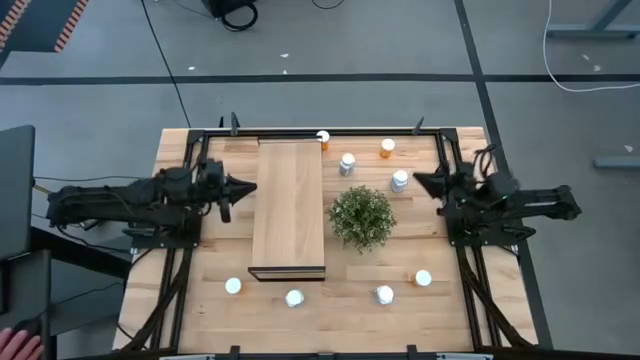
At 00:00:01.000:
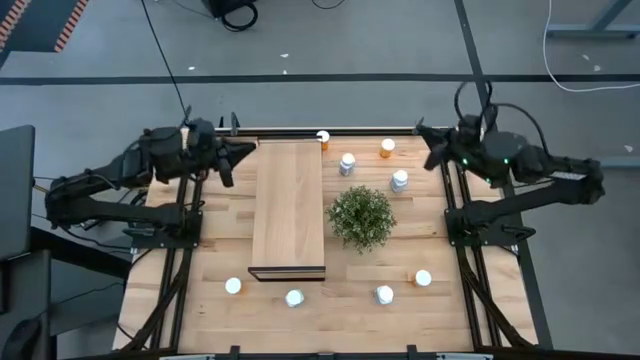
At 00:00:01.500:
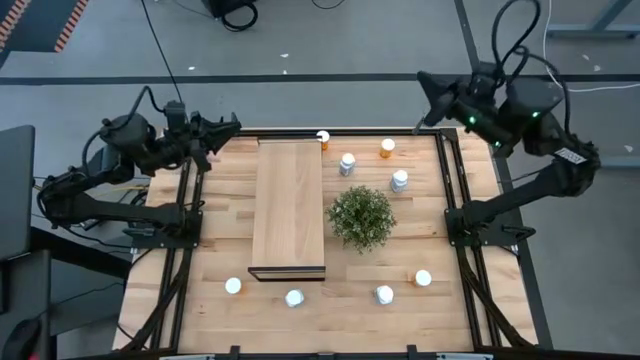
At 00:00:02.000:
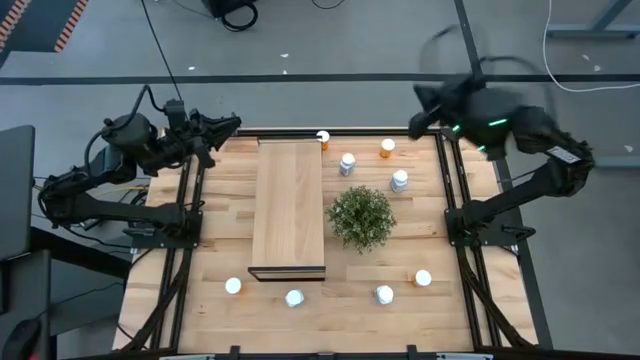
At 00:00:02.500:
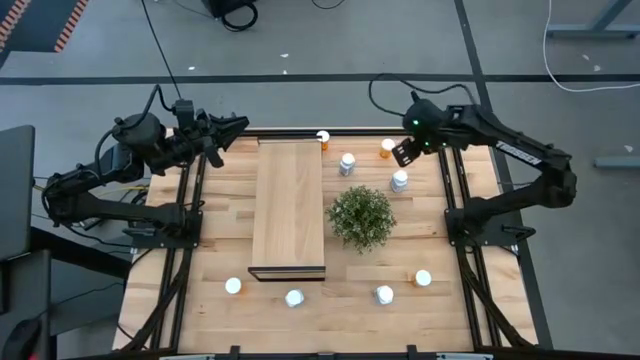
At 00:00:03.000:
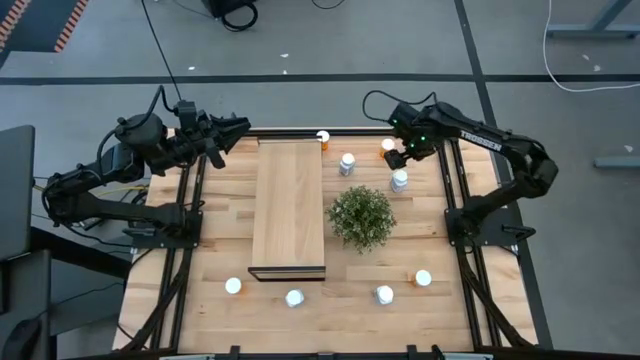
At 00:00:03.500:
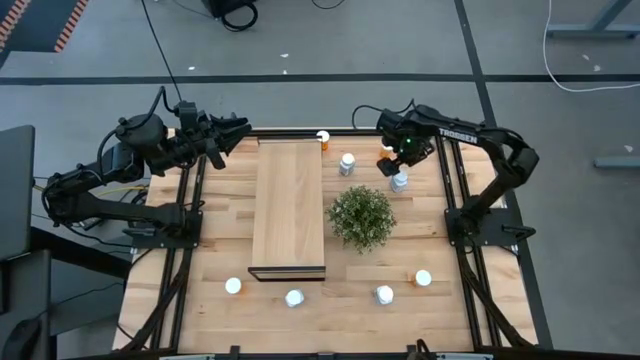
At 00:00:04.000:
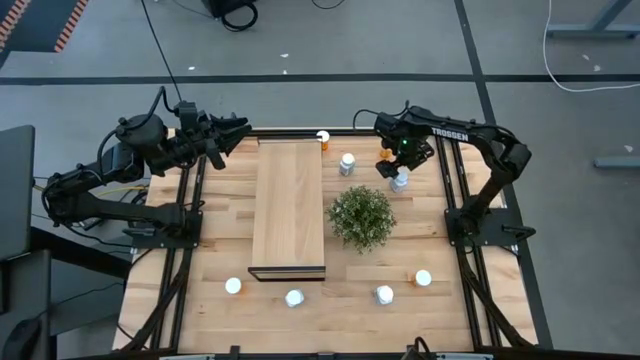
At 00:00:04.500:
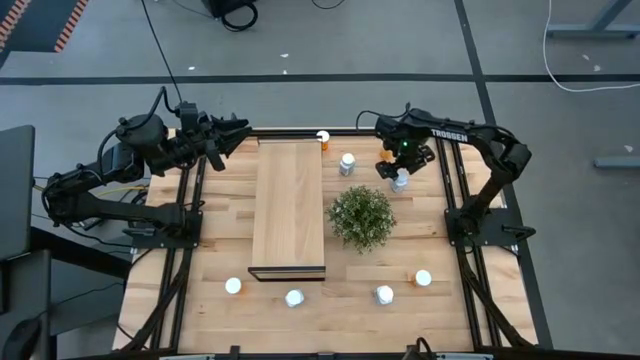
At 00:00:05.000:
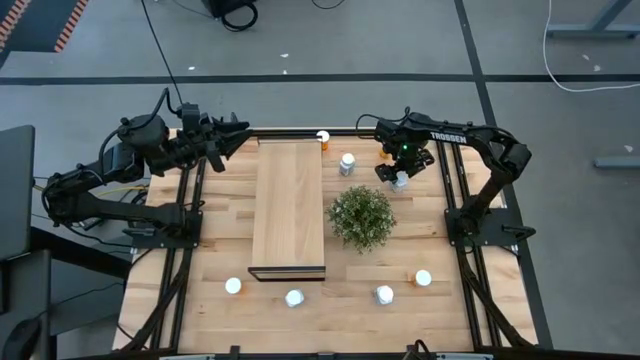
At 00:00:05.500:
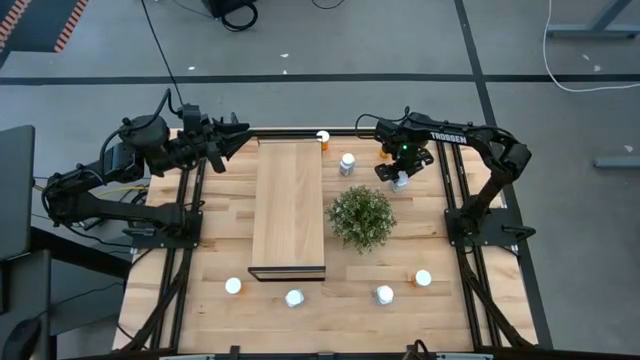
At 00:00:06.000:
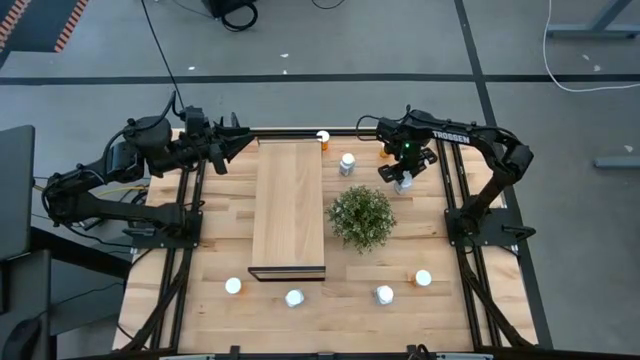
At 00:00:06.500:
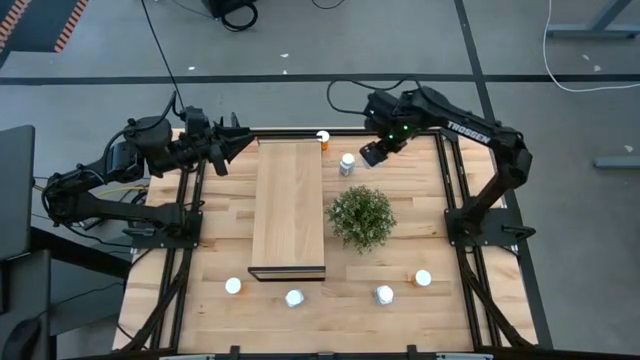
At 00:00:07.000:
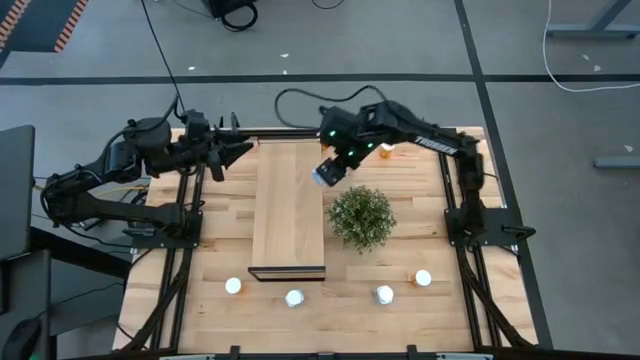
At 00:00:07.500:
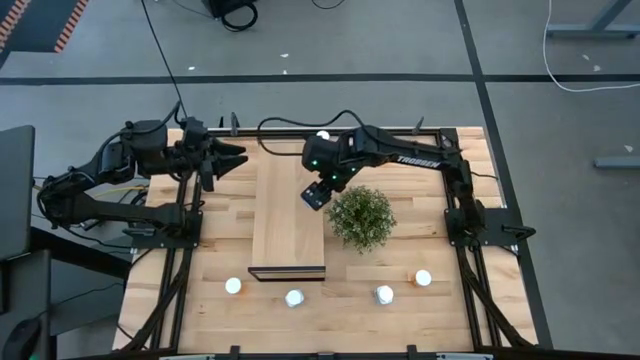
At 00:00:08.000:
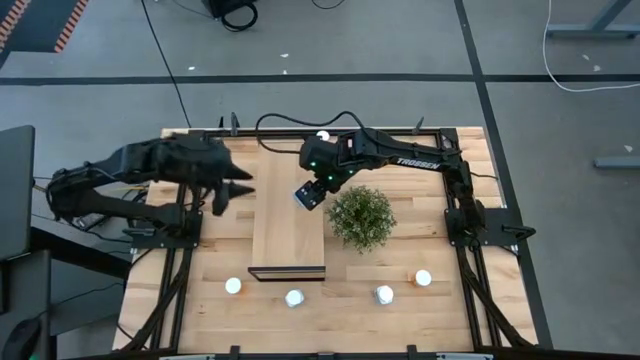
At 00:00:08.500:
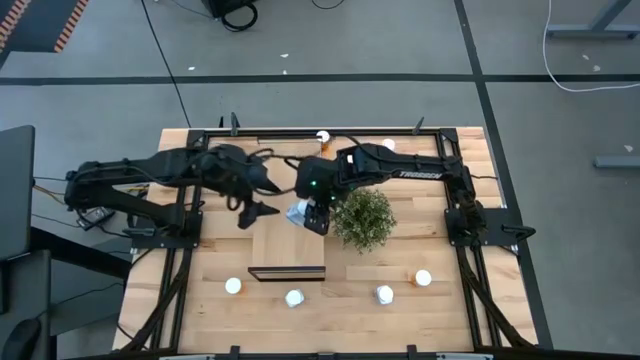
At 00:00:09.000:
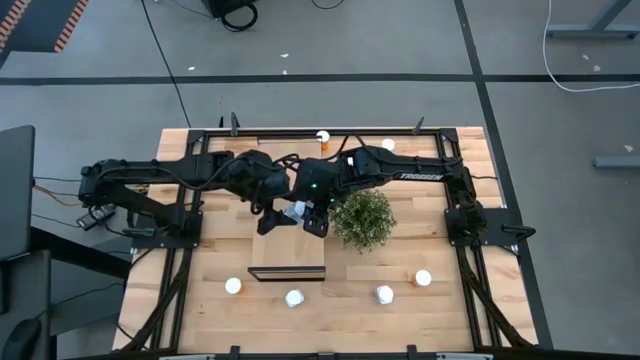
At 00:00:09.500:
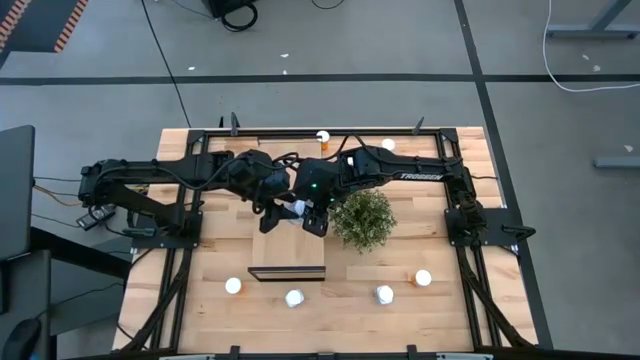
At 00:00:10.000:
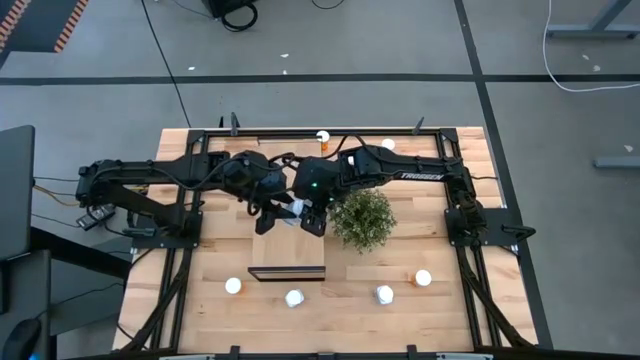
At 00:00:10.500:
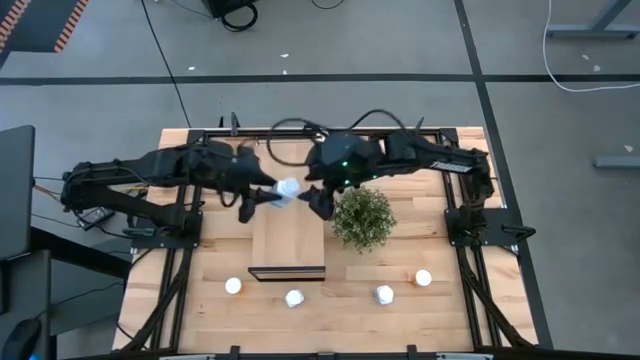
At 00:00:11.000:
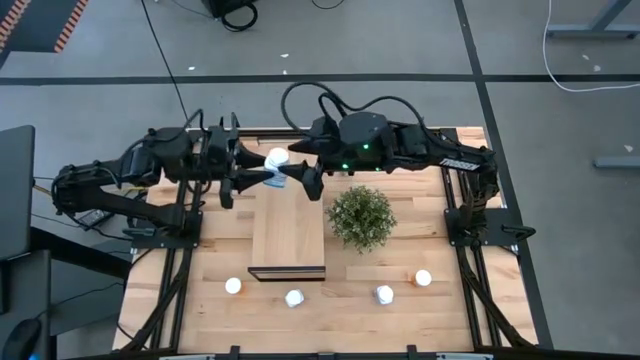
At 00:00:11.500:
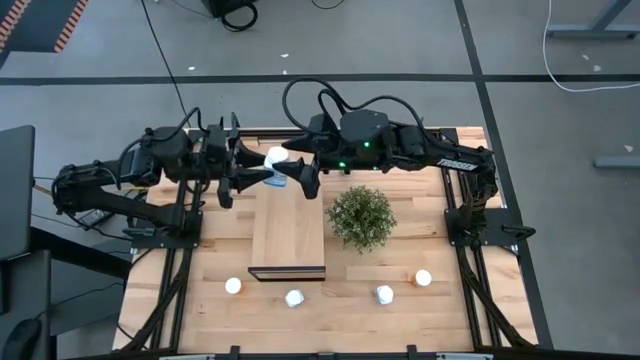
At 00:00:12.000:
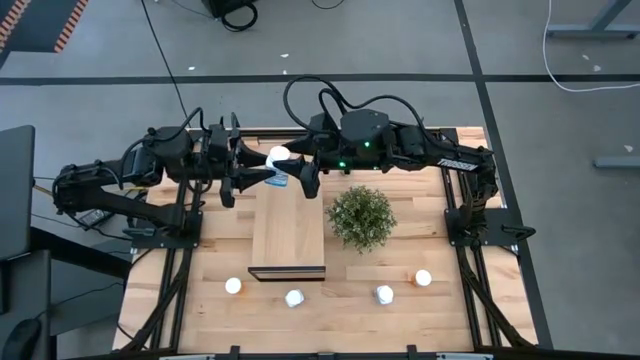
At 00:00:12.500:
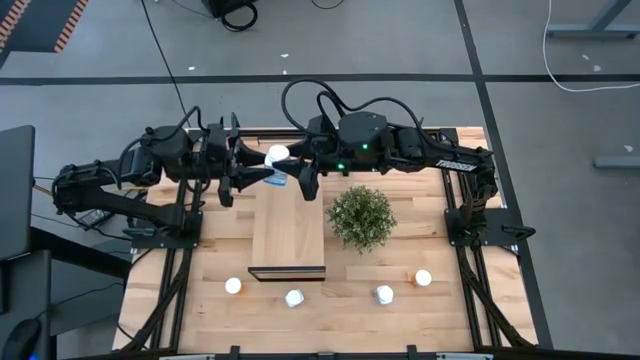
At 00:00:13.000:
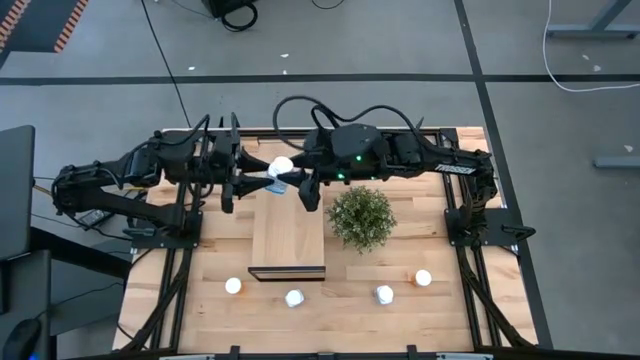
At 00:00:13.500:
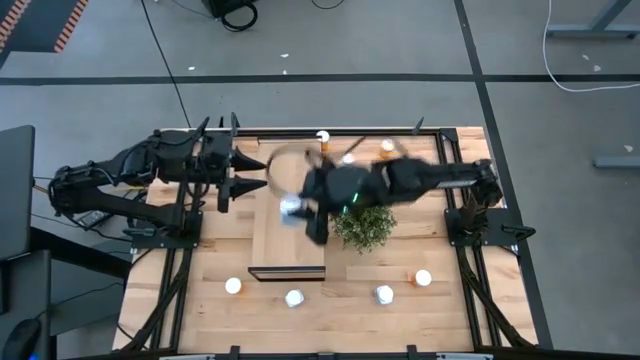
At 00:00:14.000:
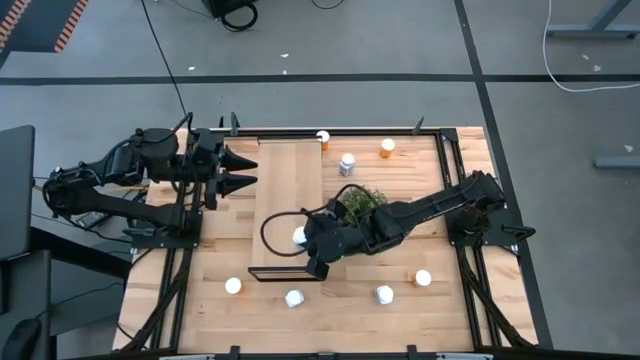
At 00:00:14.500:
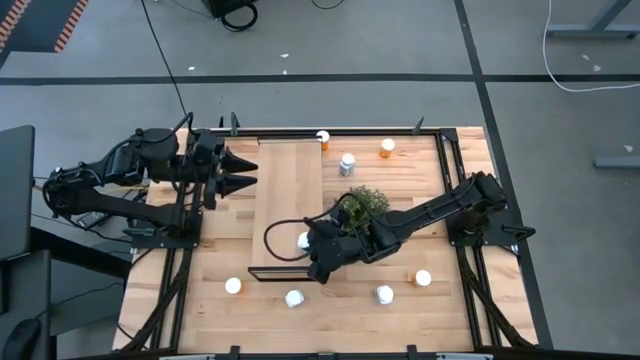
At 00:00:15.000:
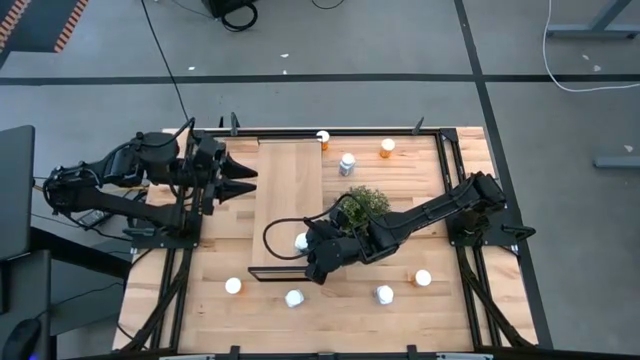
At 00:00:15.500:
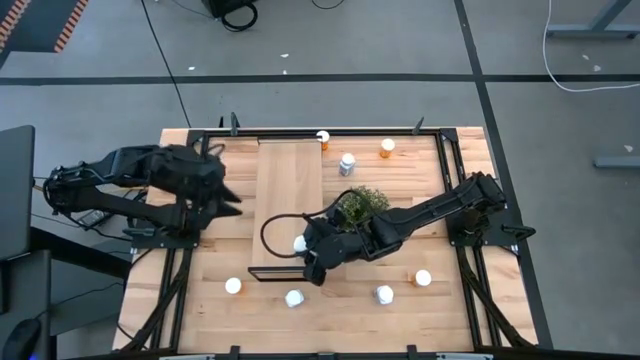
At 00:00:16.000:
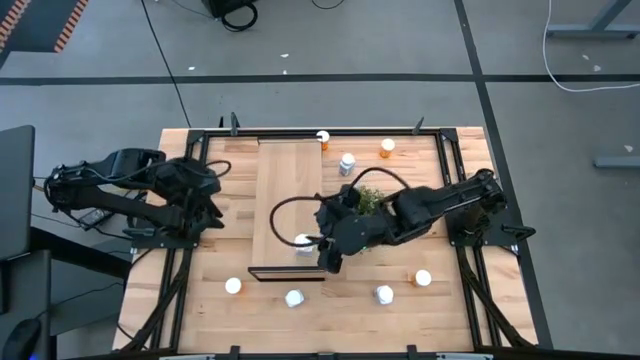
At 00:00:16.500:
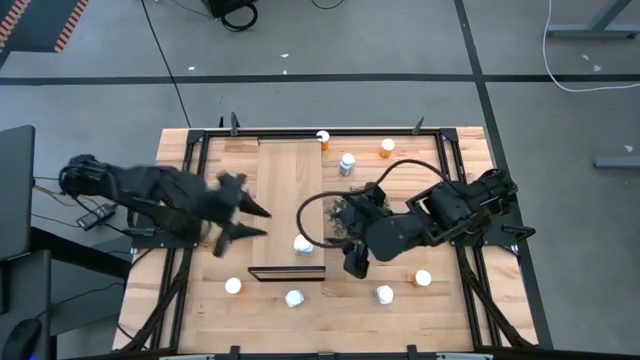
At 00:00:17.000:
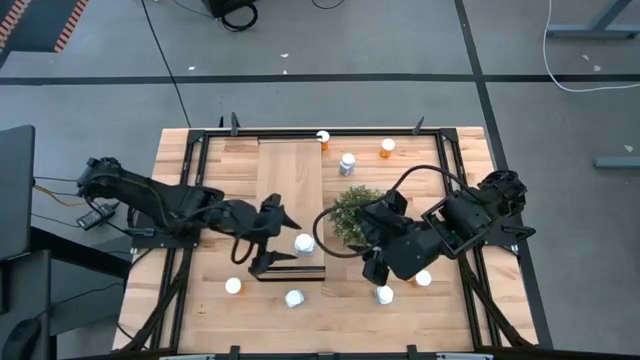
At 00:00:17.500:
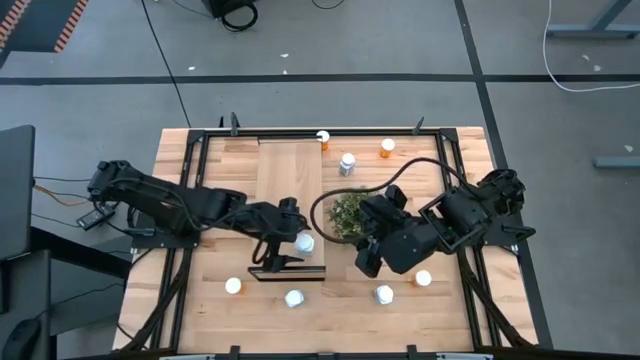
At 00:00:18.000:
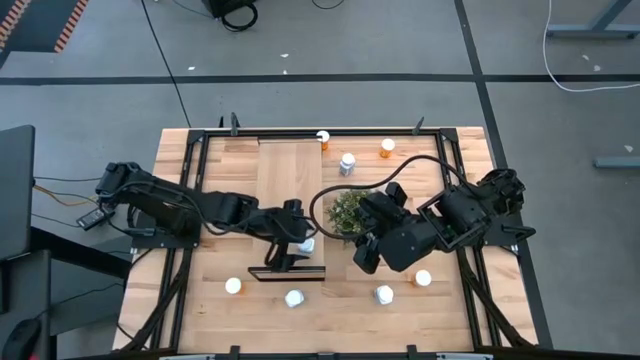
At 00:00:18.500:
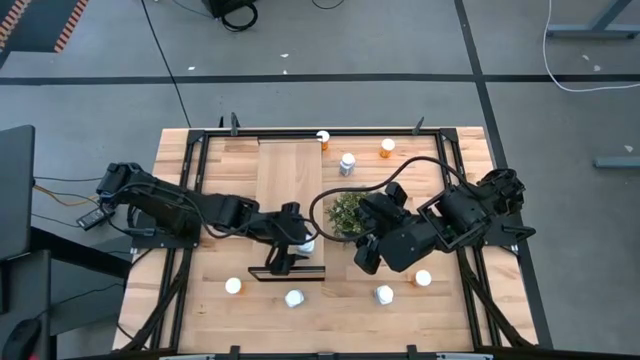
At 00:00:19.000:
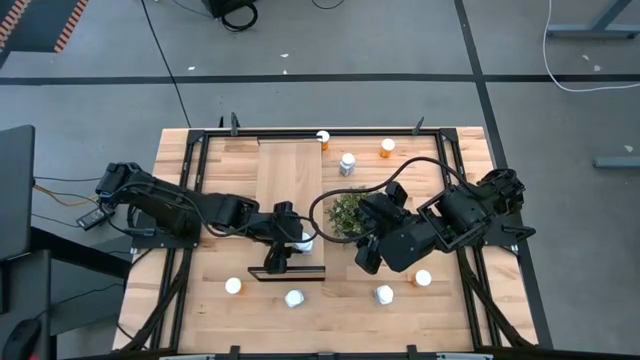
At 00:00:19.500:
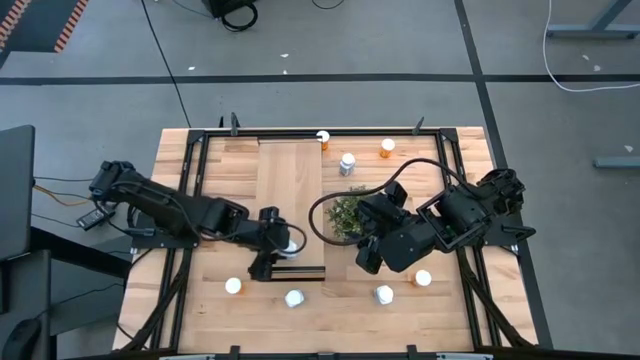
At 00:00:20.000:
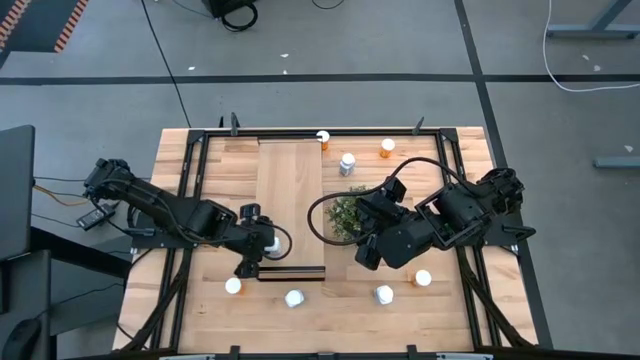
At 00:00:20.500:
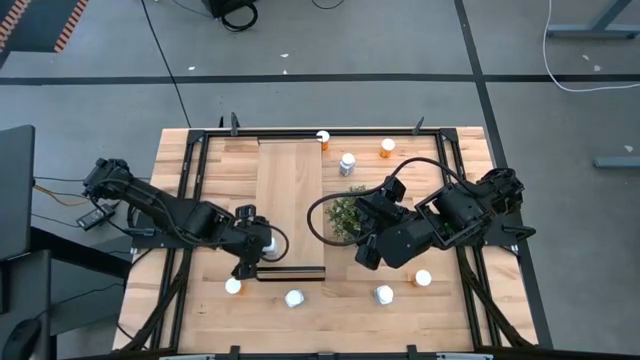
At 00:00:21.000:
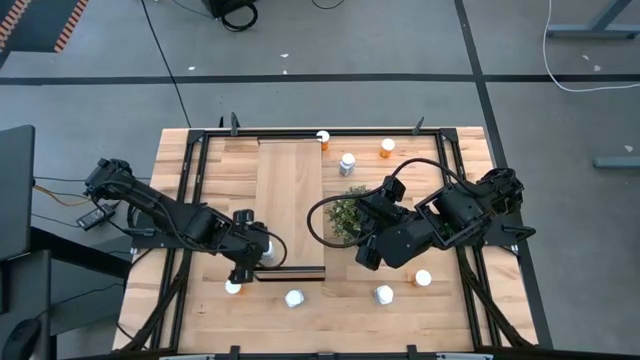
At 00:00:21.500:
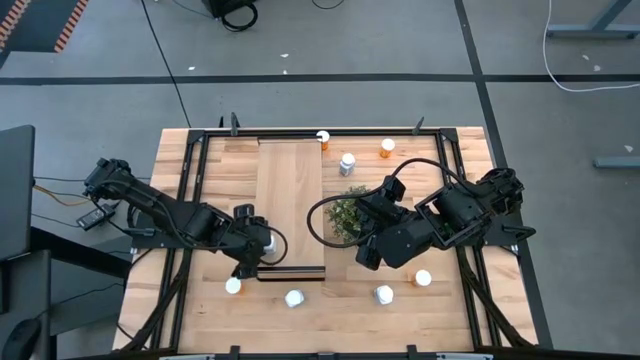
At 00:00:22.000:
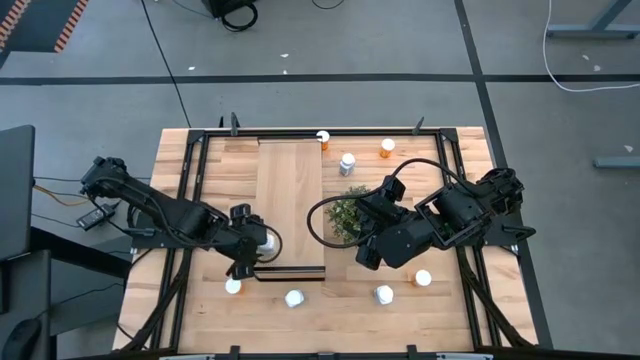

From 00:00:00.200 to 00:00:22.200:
Task: Pick and place medicine bottles onto shelf by color
Put the top right white pill bottle on the shelf
